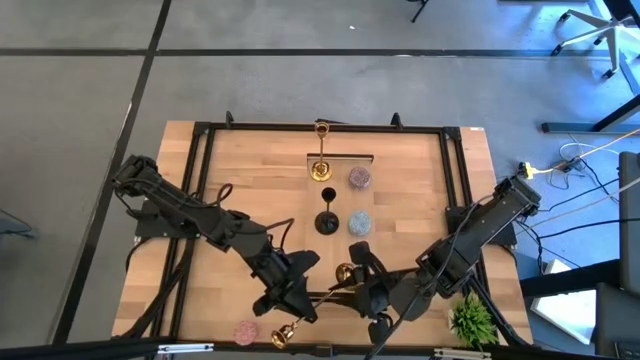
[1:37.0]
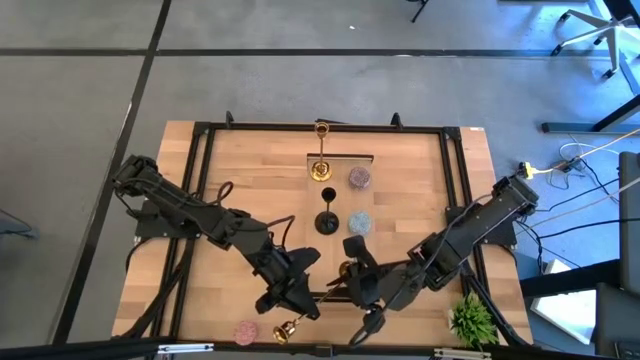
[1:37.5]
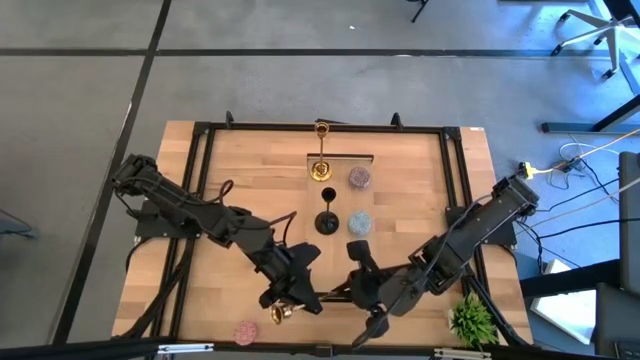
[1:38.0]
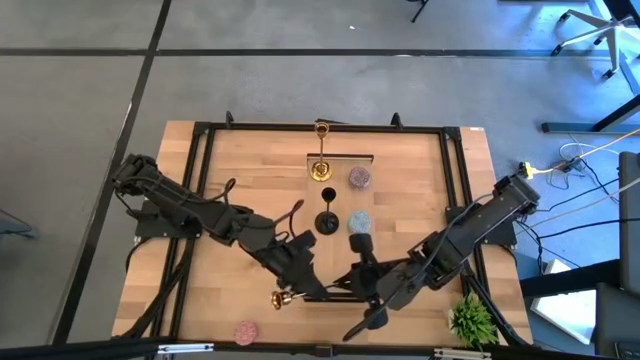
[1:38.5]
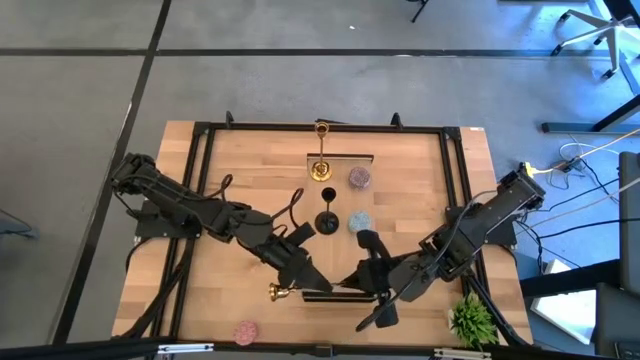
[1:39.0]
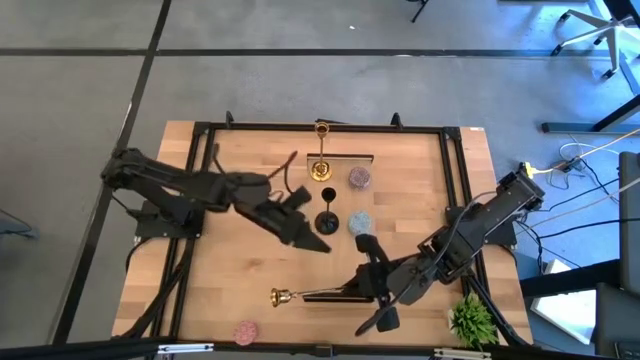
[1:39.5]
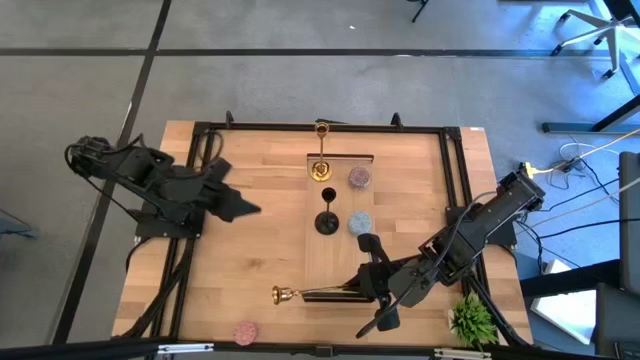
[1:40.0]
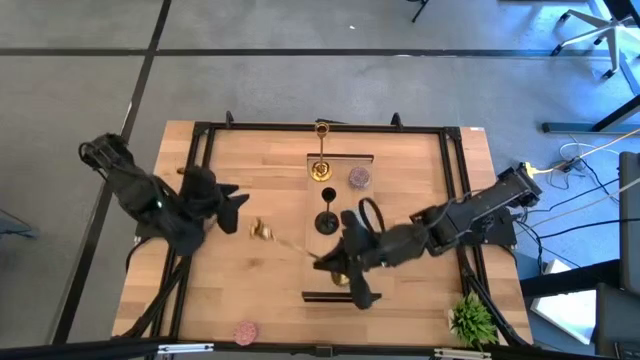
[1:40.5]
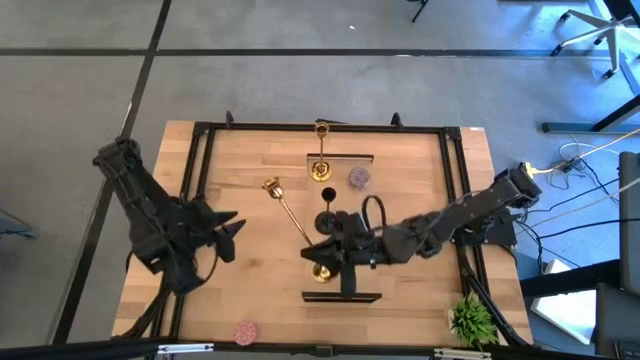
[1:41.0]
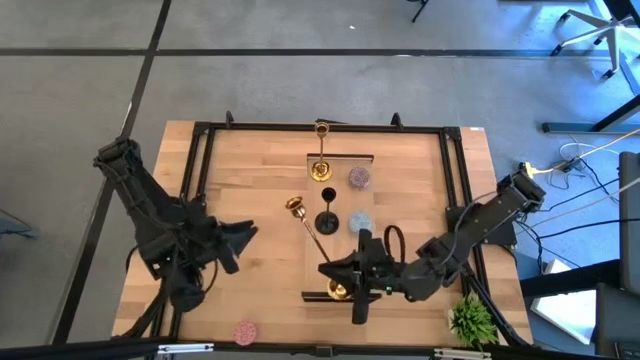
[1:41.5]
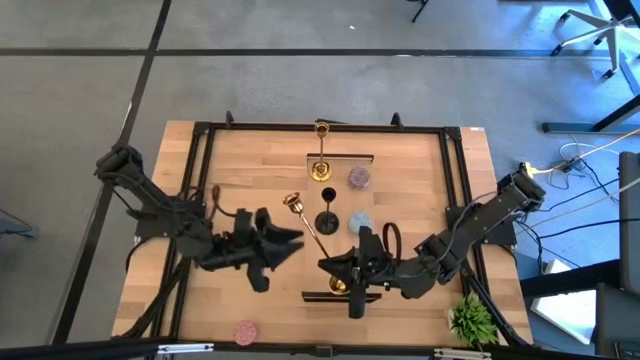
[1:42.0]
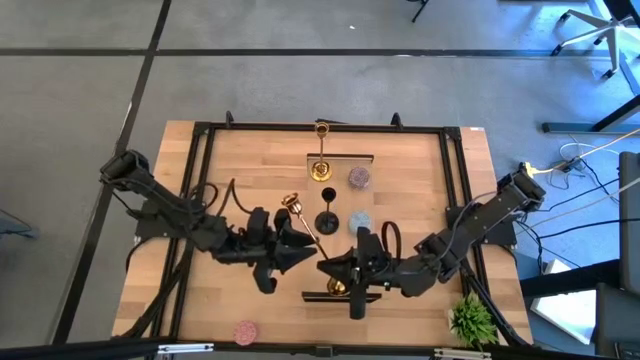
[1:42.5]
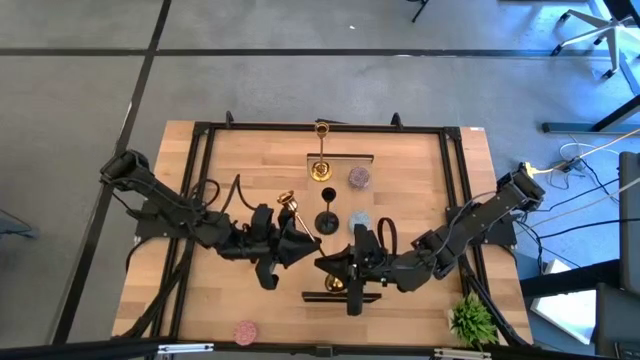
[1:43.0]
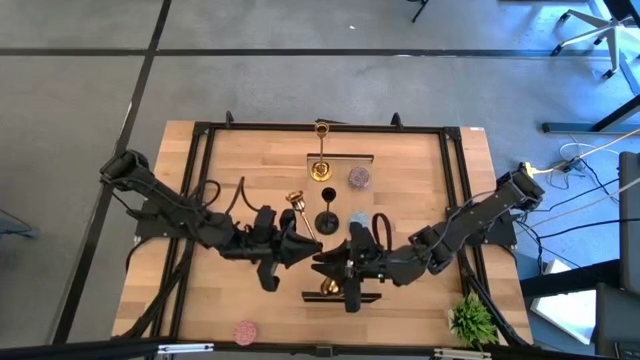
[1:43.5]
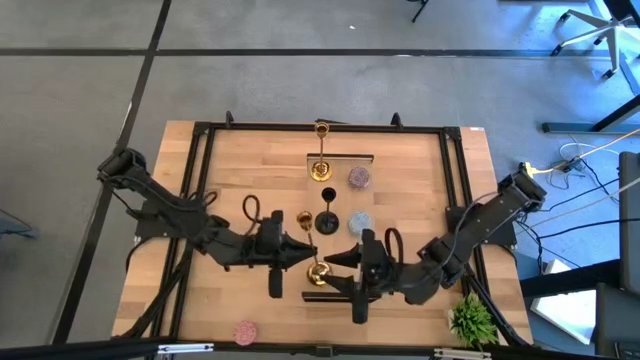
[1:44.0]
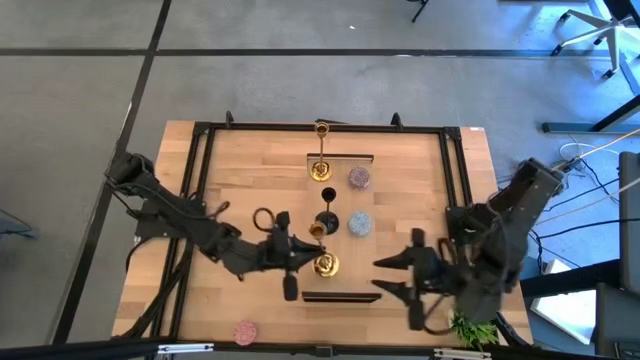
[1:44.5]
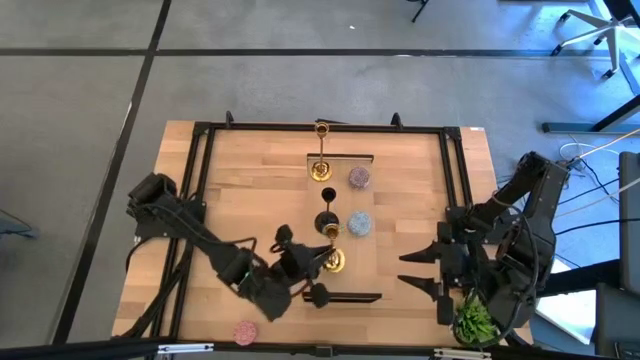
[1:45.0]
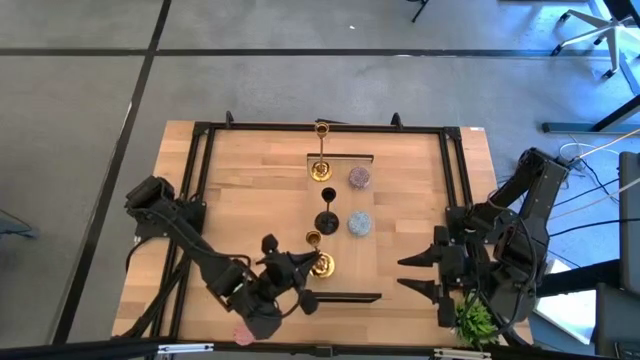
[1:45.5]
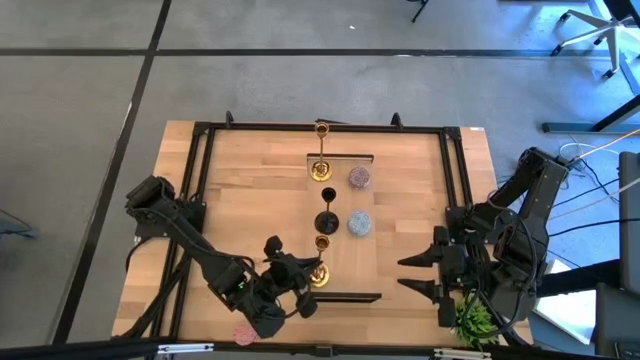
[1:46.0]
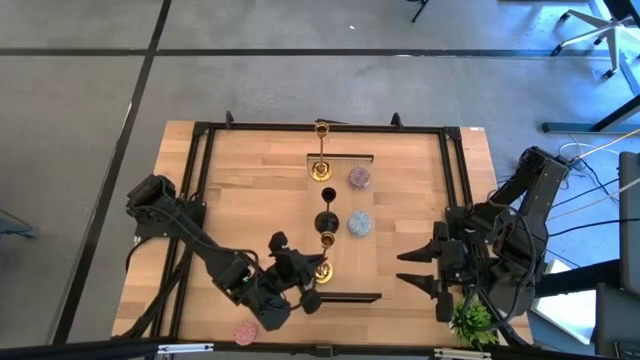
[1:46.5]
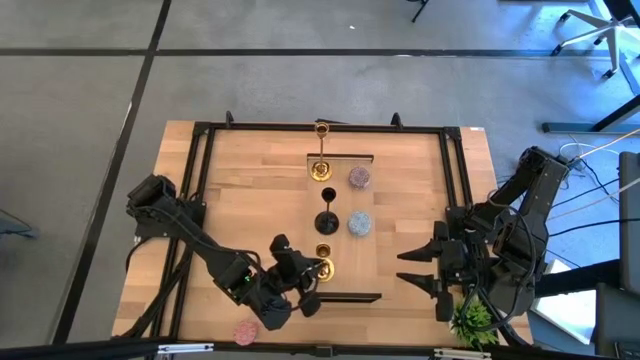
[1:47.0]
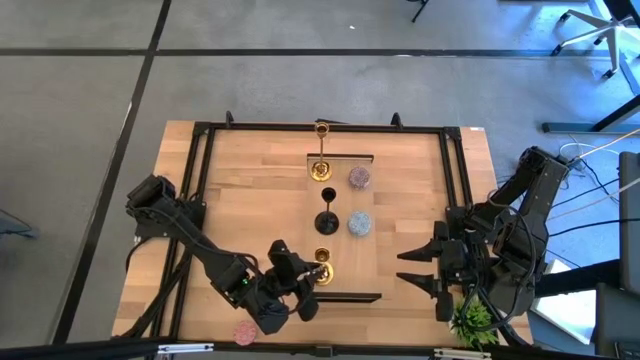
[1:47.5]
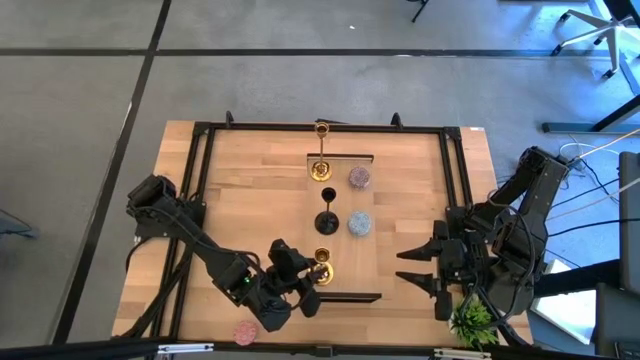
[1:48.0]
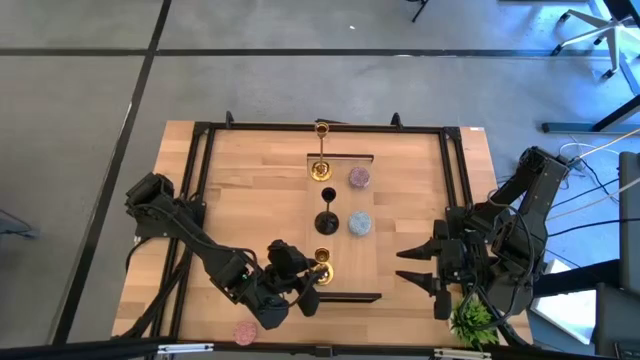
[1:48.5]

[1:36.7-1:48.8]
Task: Pick & Place candle stick holders
Put the golden candle holder on the shelf

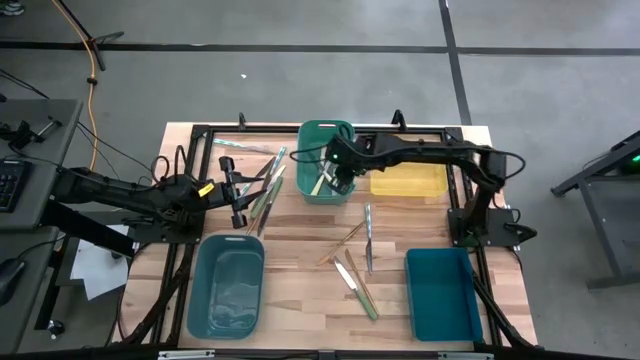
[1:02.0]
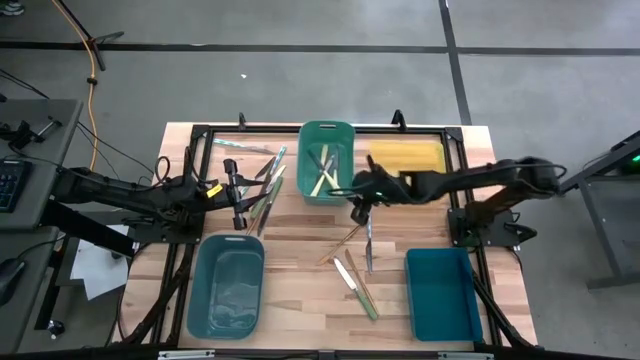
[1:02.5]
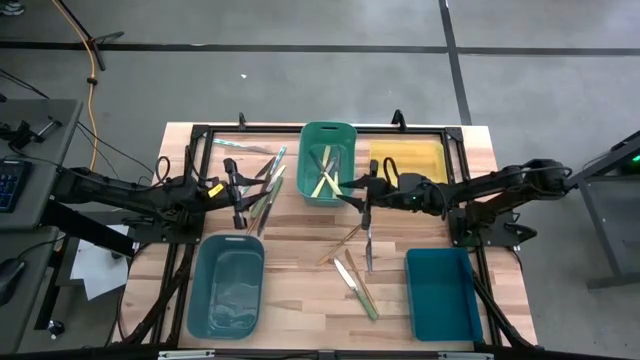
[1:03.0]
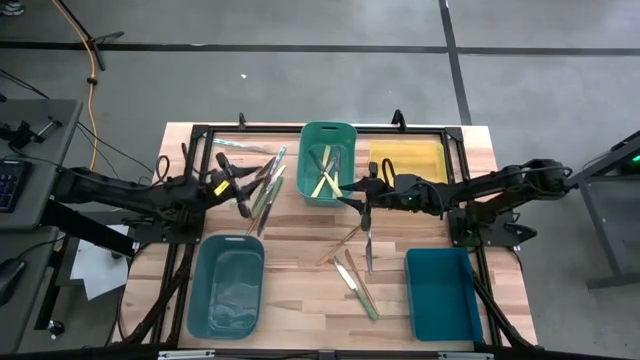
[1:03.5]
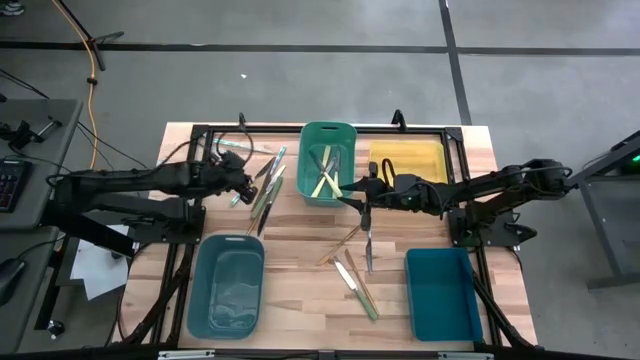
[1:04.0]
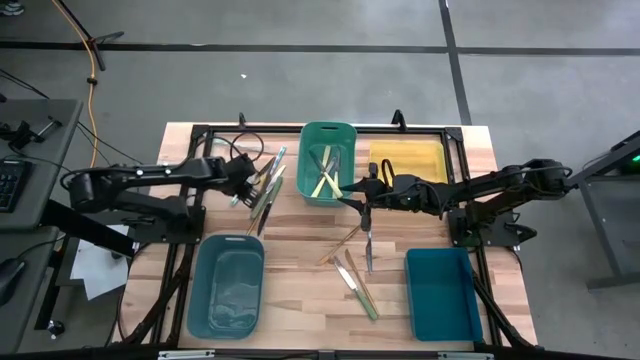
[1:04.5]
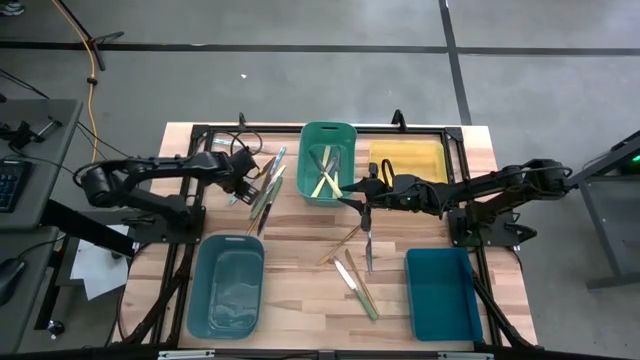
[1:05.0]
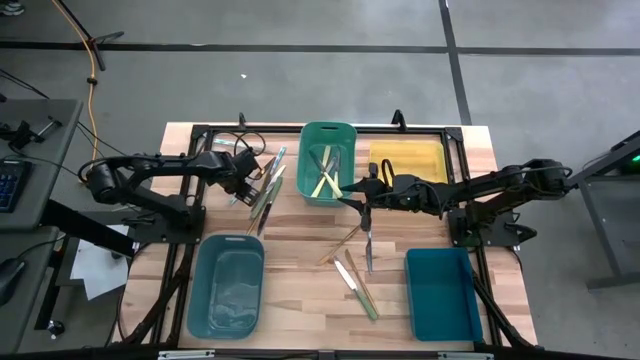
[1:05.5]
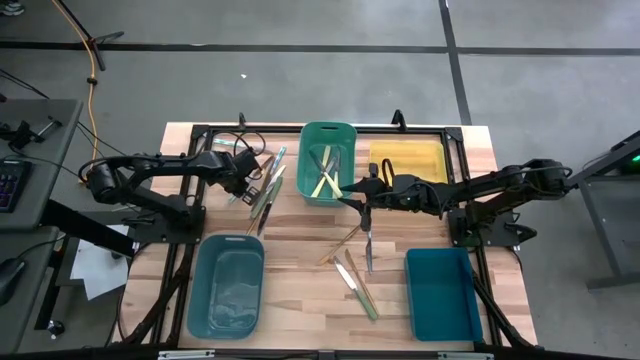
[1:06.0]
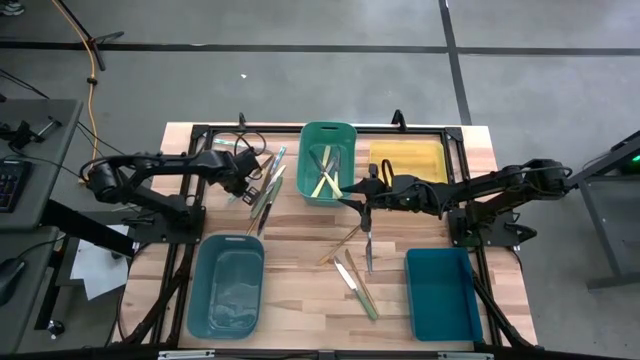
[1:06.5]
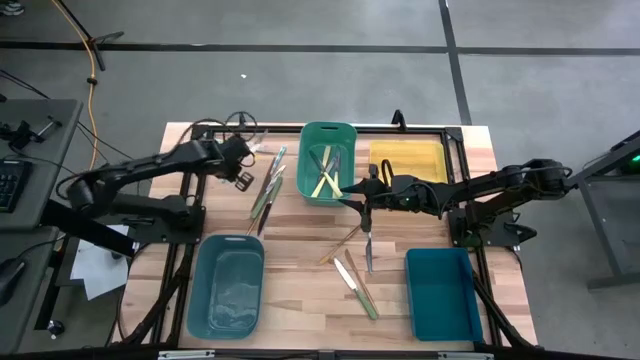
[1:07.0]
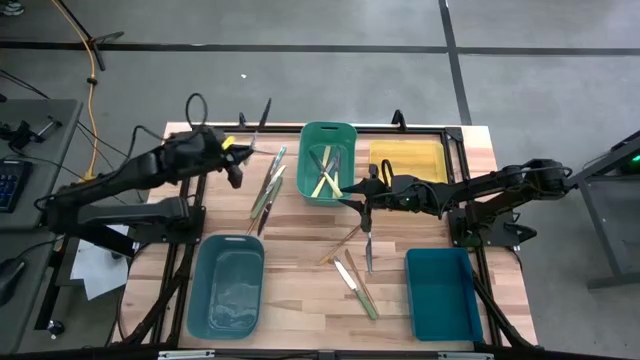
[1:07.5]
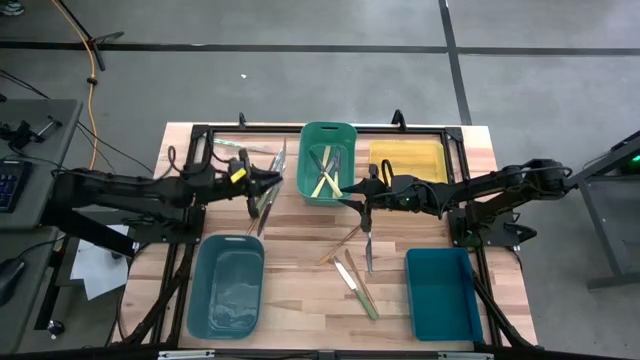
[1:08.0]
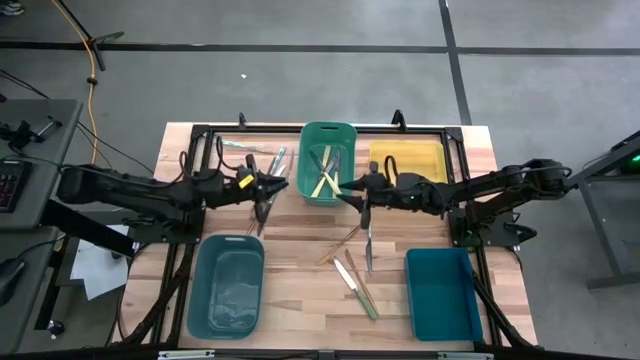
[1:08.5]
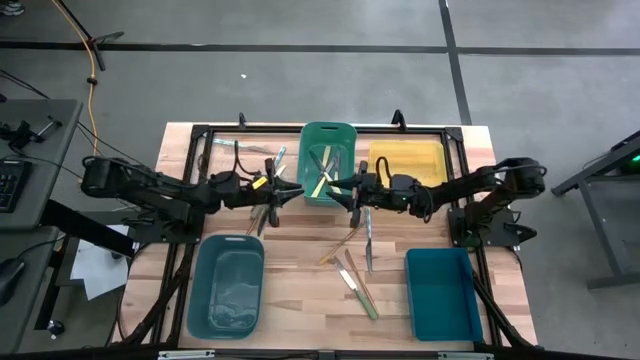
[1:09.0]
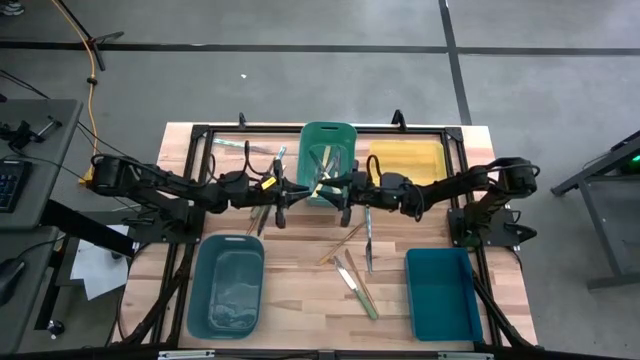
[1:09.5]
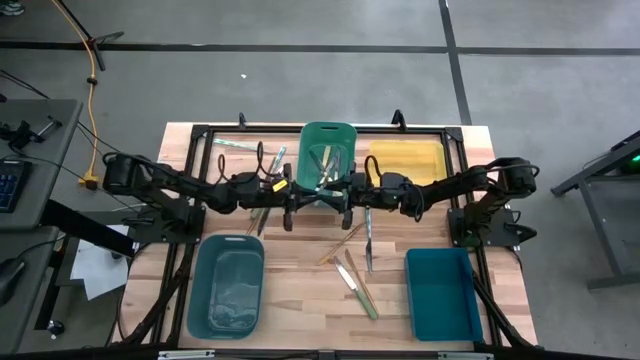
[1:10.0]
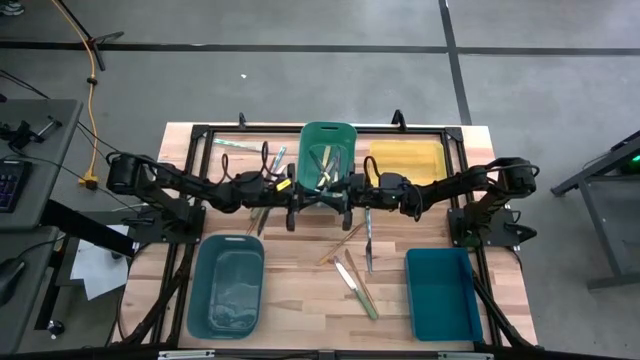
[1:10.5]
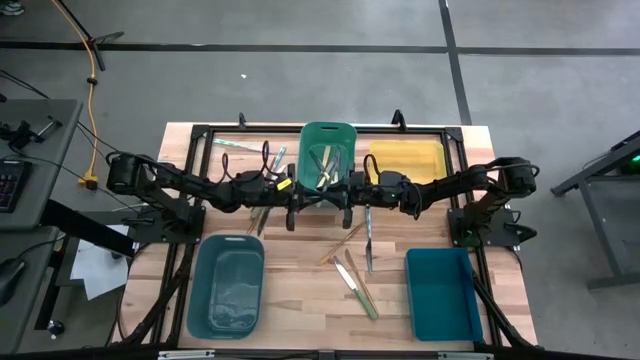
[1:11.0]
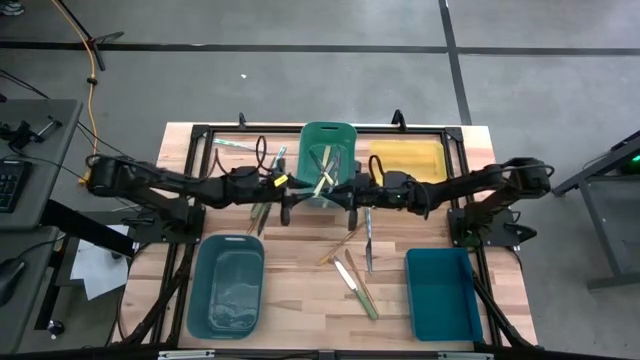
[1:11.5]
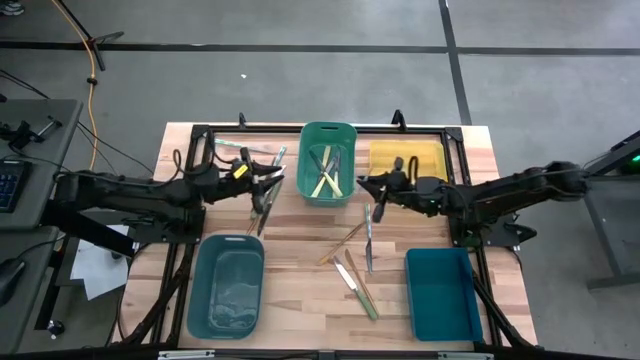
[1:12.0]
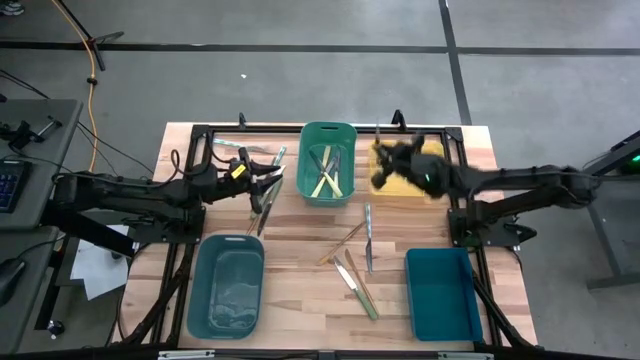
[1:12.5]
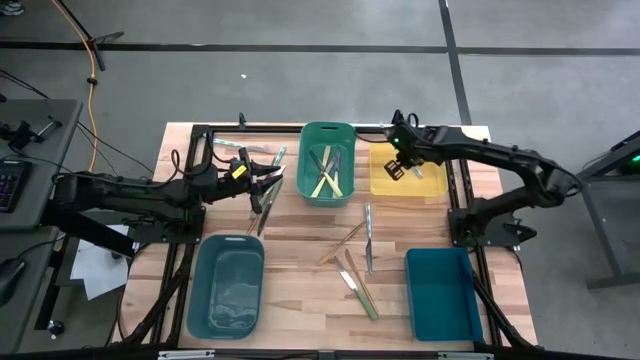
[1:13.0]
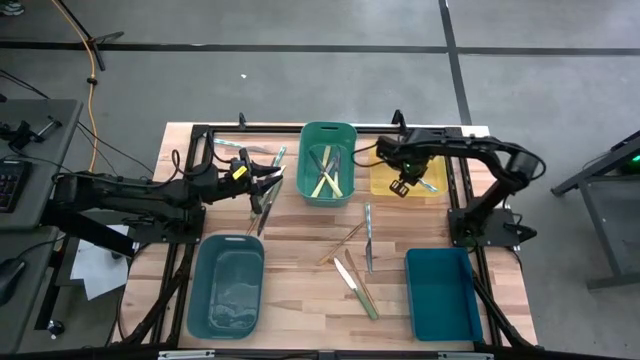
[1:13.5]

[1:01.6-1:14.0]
Task: Sort silverware by color (type)
Put the blue patterned knife into the yellow bin
